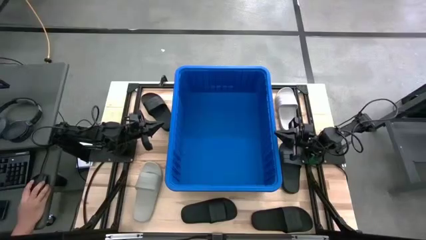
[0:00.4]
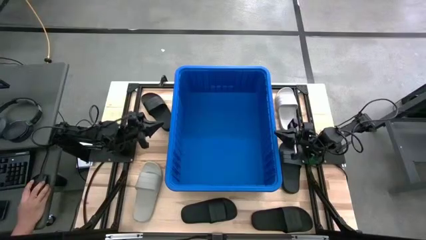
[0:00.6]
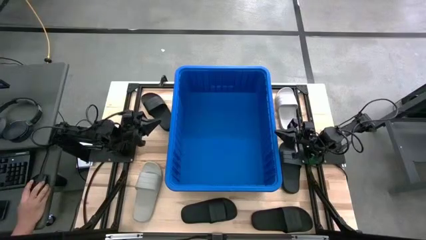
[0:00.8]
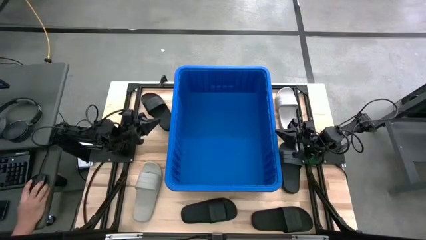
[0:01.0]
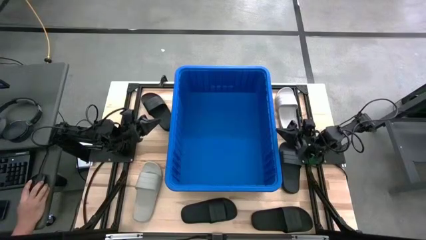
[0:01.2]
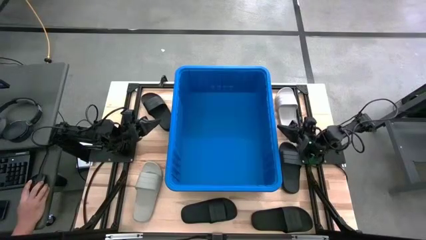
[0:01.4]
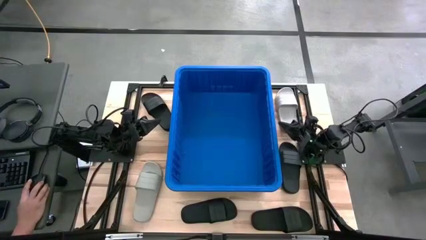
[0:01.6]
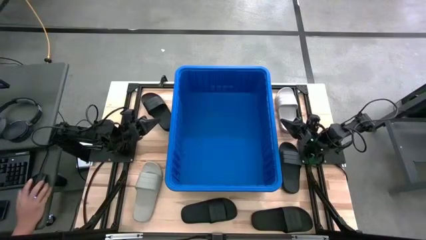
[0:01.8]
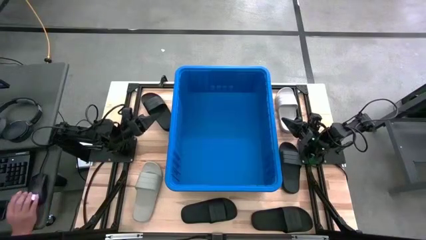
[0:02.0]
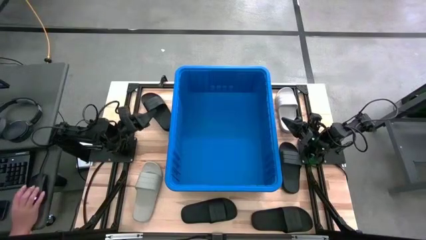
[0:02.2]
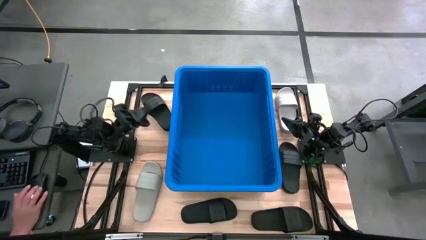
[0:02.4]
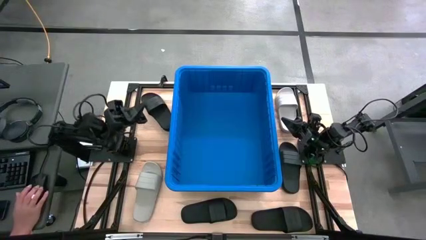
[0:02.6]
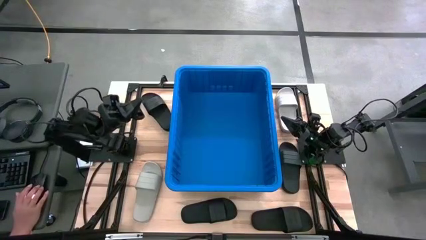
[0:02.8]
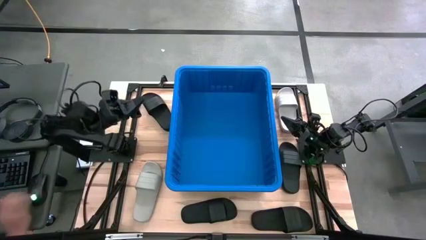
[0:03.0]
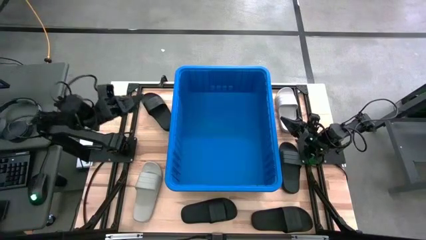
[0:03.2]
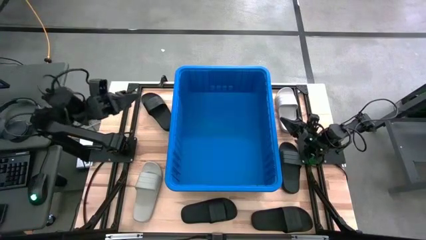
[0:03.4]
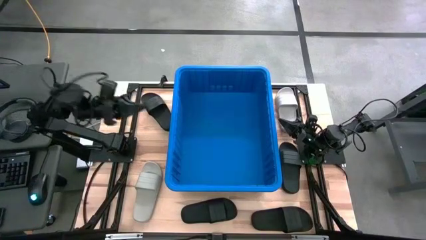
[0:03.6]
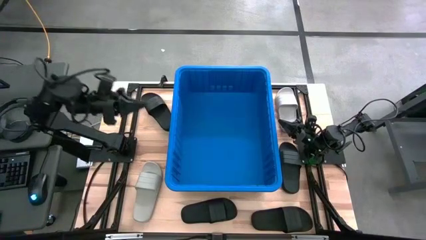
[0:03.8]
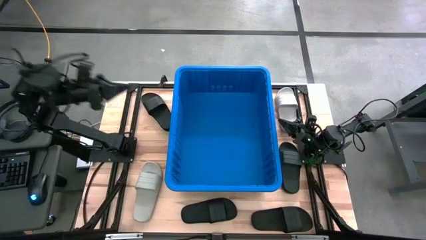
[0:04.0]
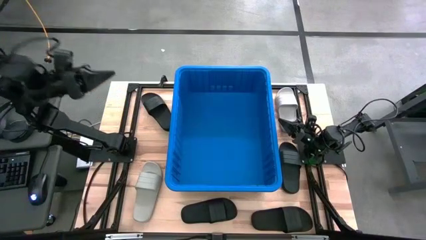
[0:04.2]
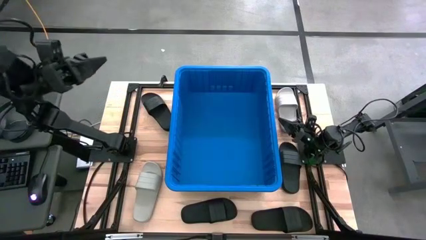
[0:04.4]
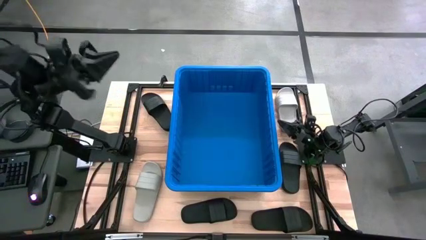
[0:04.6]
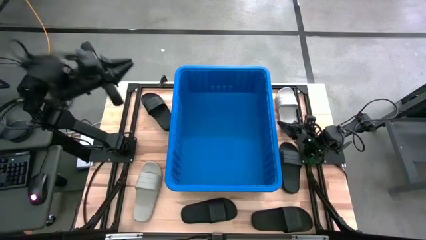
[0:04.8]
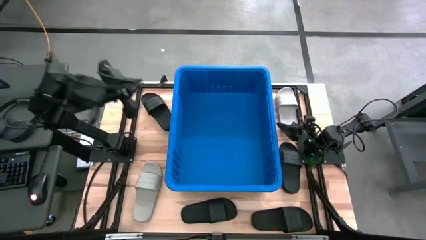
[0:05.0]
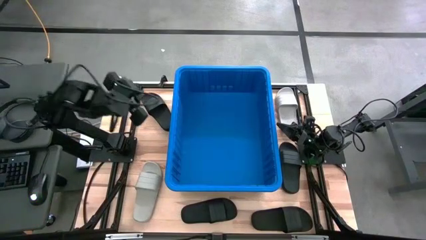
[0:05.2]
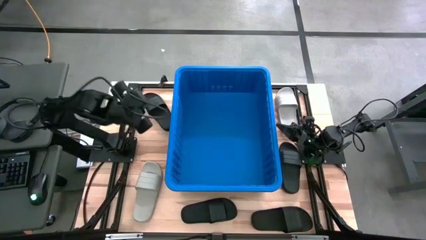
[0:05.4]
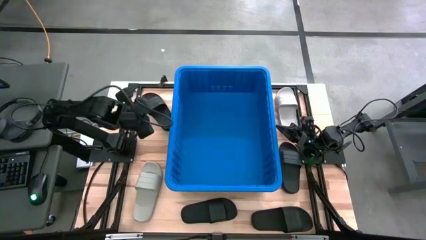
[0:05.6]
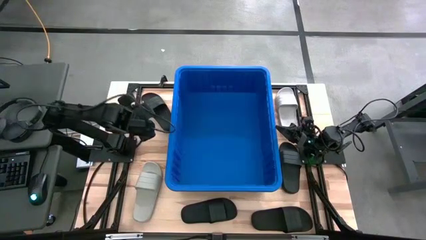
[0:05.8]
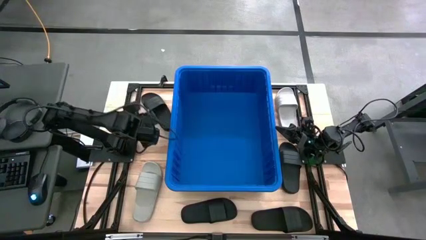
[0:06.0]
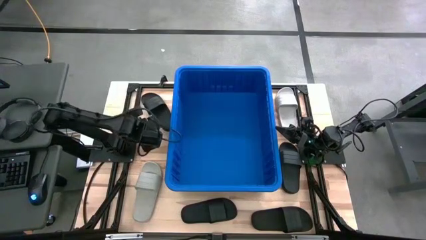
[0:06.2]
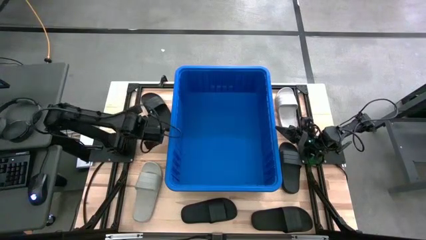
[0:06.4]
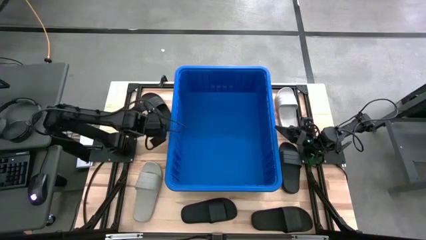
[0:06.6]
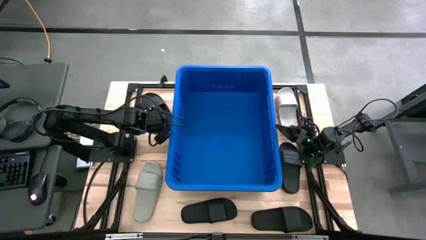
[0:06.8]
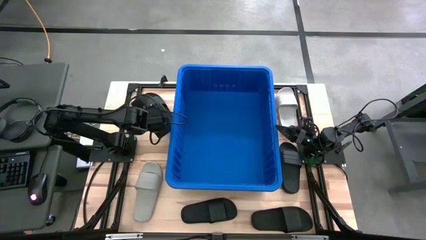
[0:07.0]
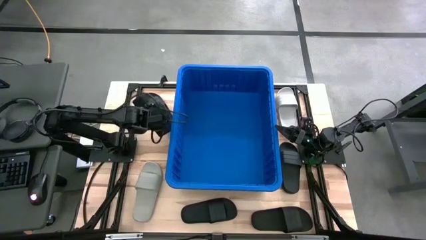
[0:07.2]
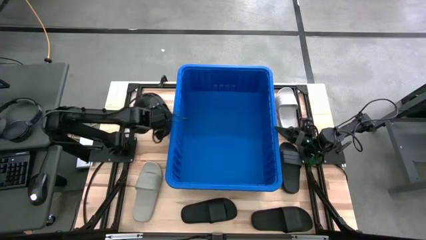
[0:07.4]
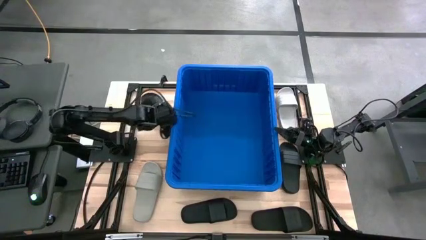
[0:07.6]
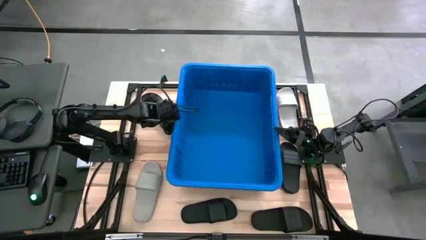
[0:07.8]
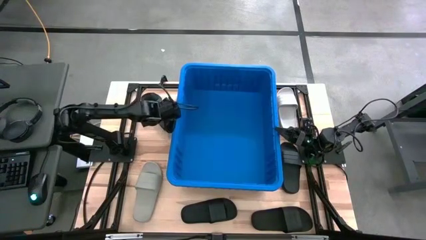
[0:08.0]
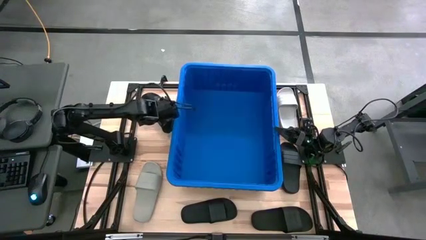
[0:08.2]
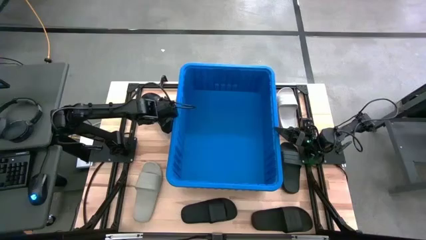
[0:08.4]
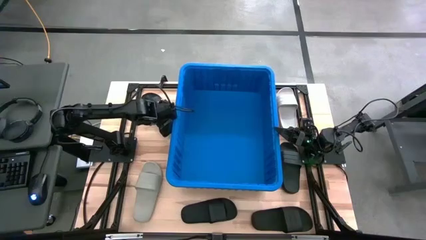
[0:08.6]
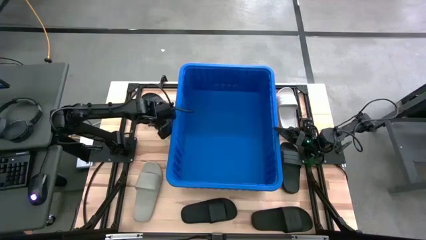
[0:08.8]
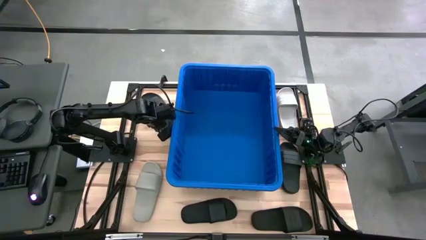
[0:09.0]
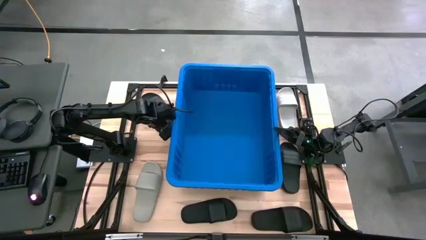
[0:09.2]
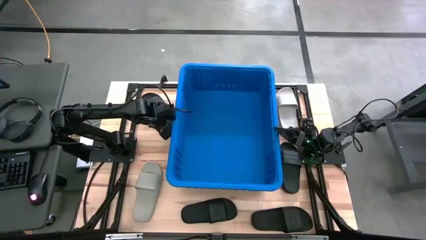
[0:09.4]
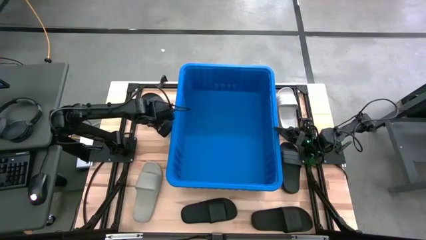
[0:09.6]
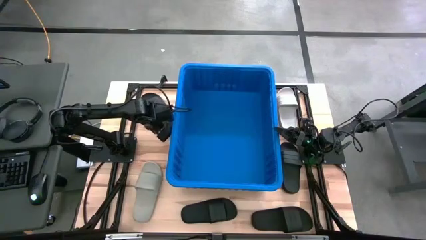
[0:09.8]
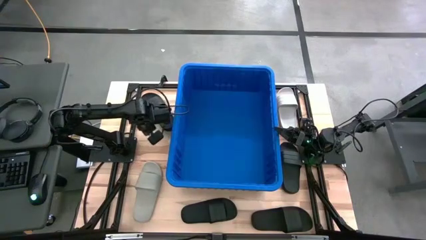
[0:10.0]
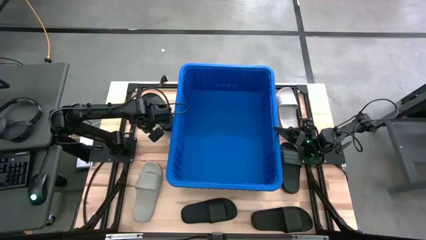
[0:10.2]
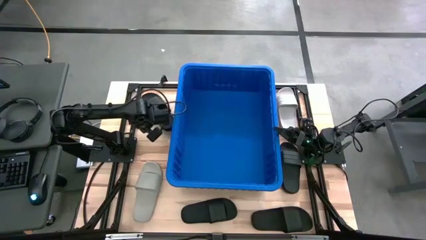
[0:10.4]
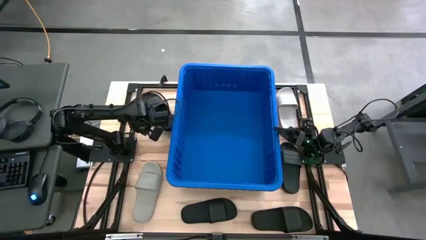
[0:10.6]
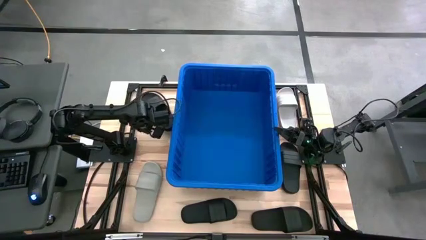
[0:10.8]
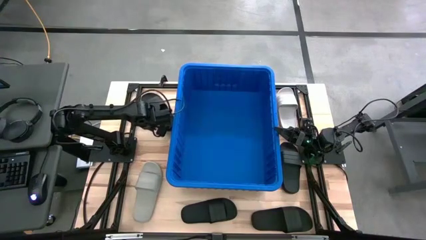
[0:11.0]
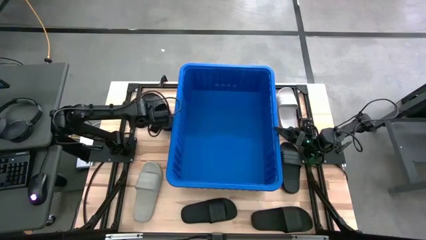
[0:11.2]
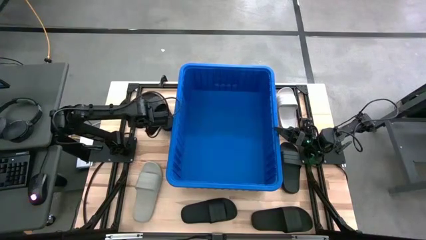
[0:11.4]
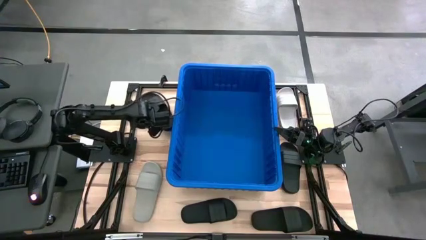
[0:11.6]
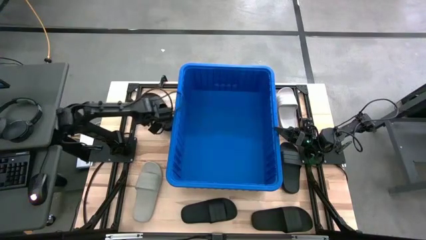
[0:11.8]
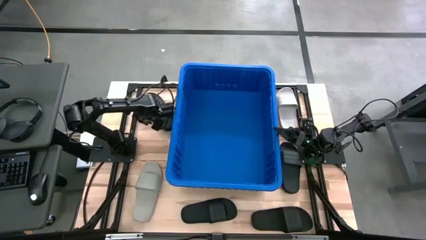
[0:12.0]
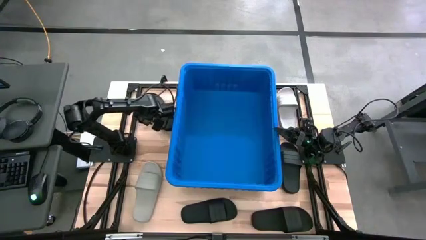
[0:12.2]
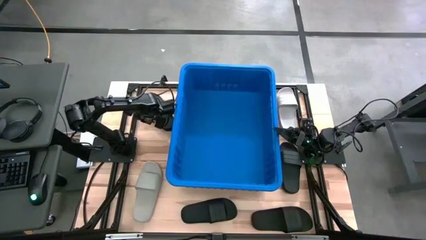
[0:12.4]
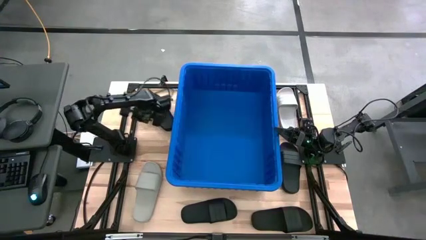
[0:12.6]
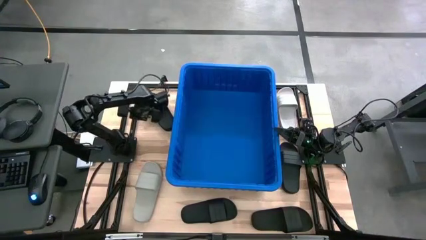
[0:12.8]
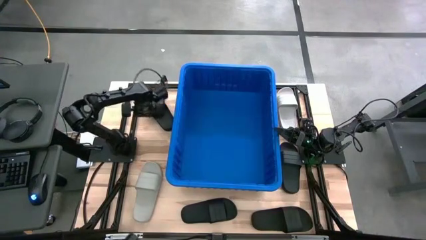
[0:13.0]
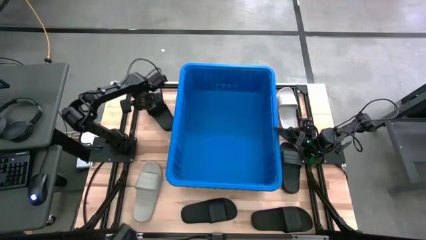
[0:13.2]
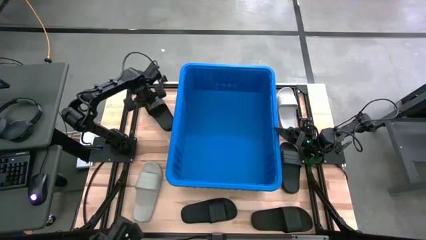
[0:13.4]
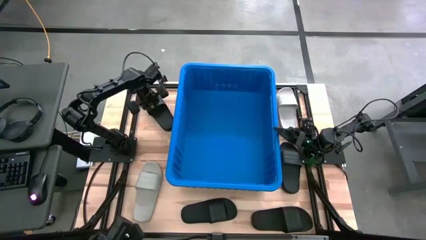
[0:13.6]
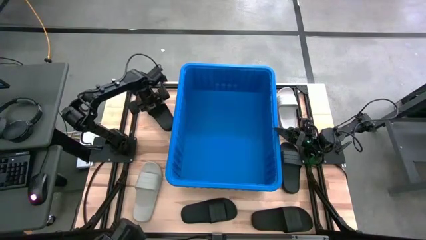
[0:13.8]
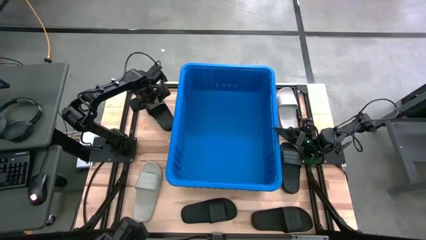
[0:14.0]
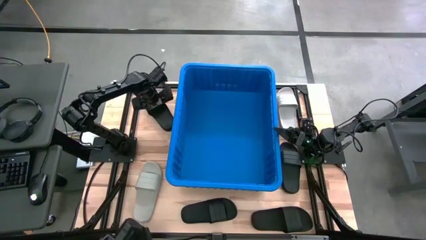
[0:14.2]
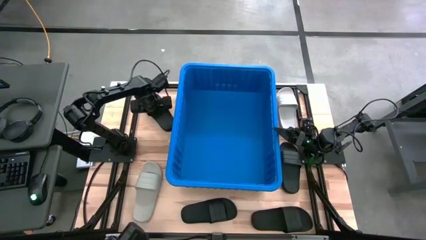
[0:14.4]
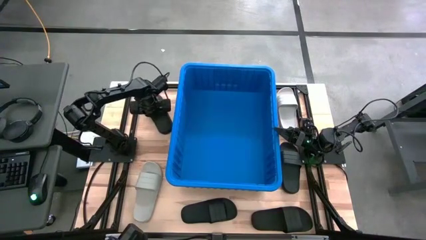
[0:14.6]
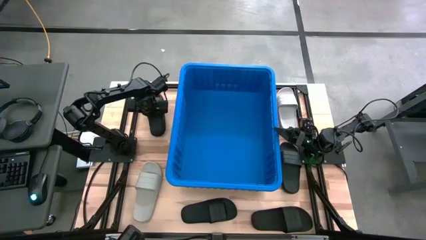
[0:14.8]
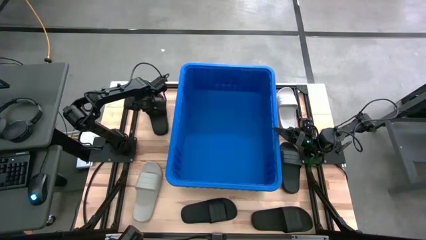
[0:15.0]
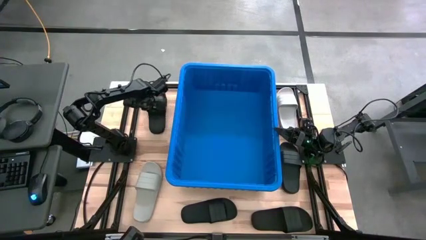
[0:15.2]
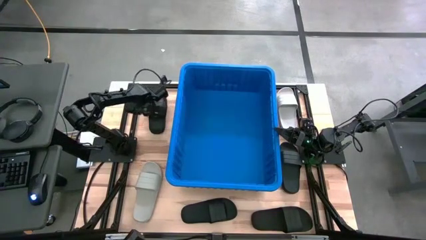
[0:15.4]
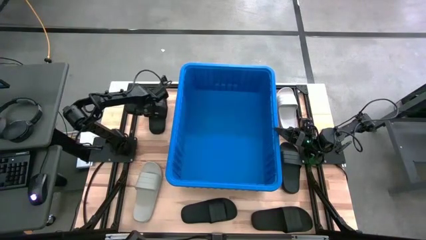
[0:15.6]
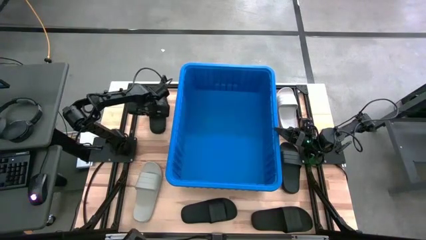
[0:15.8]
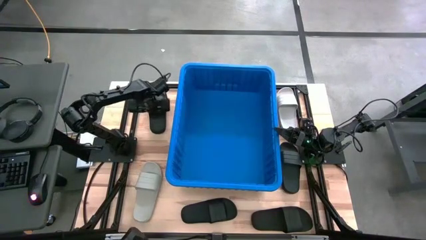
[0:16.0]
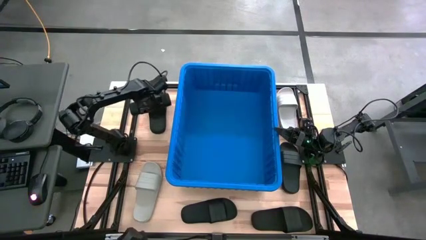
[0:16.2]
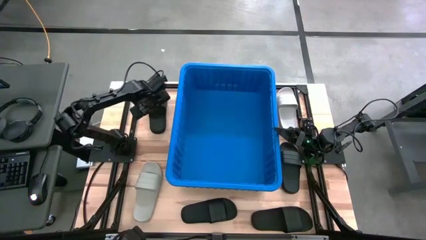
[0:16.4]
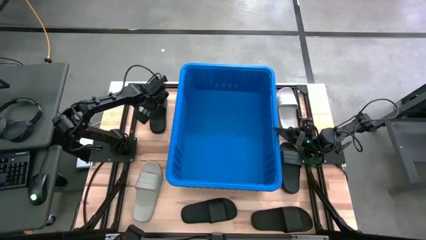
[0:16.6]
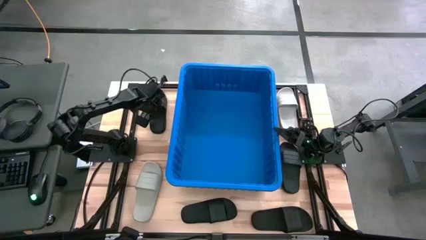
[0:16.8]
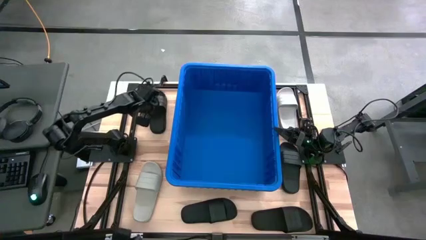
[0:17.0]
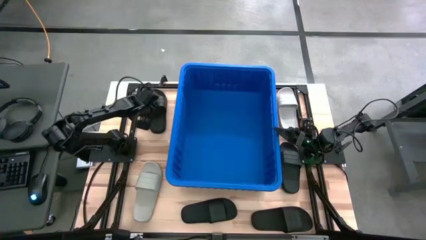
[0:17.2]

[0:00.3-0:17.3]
Task: Pick and place slides into bin
Put the black slide into the blue container
